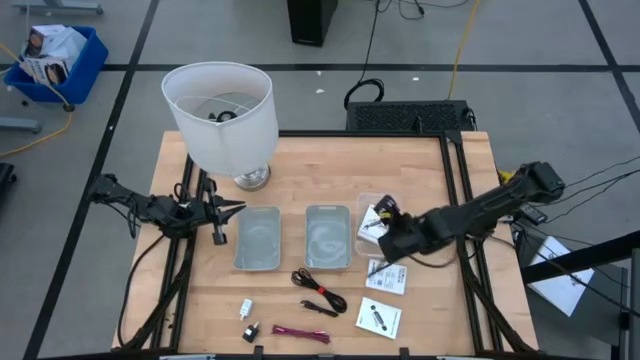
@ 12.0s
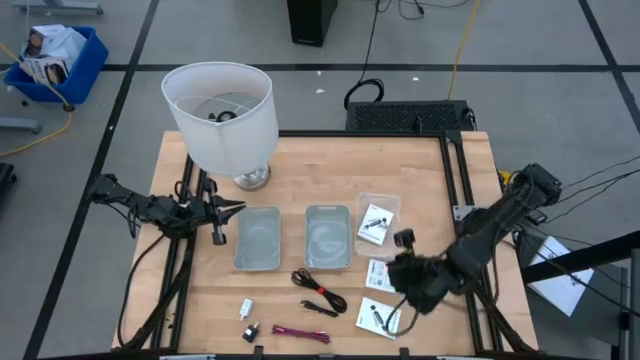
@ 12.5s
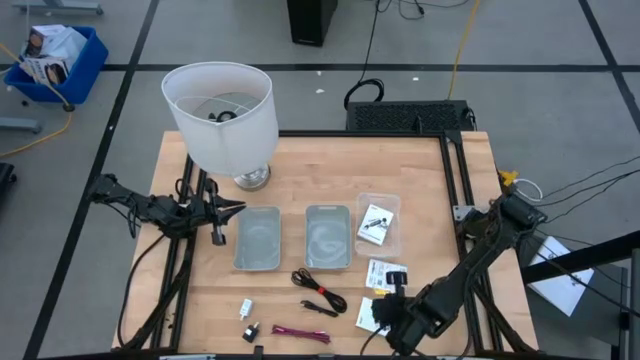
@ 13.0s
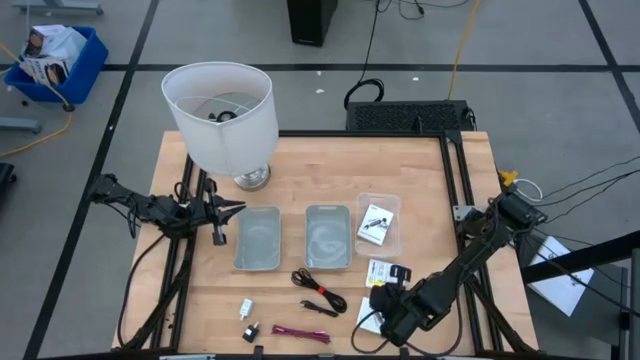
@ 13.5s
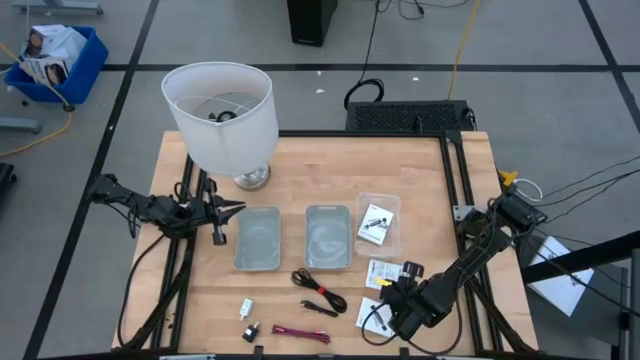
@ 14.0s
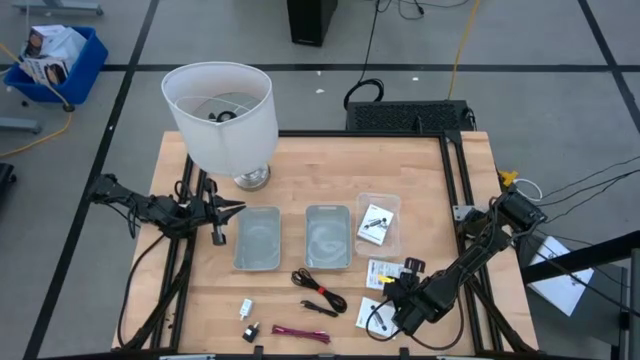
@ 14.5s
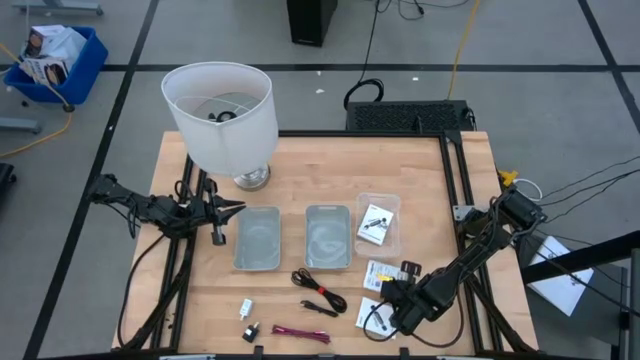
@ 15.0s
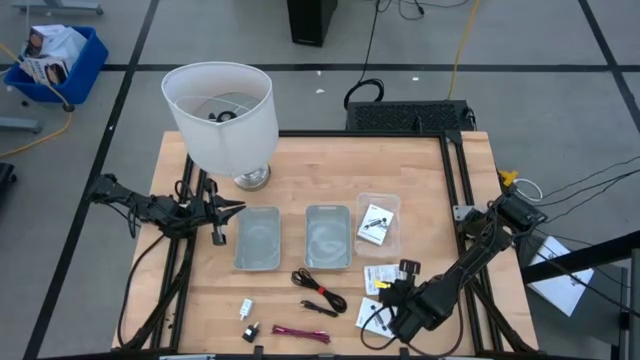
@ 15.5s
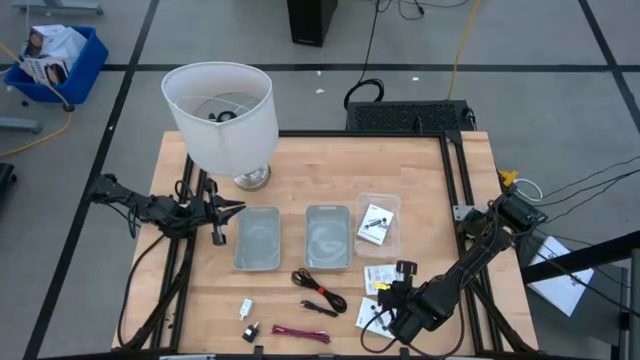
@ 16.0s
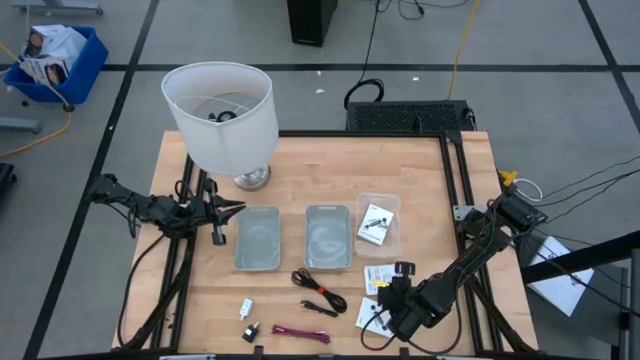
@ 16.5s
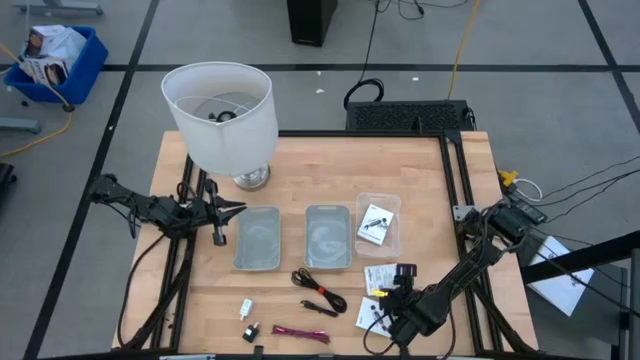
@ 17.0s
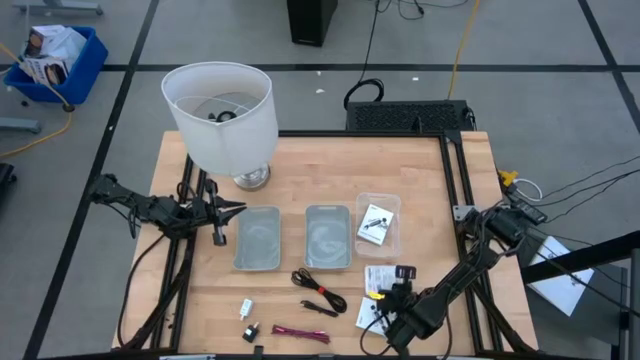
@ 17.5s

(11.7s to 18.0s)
Task: Pick and place items into bin
Put the top white card reader box into the transparent bin

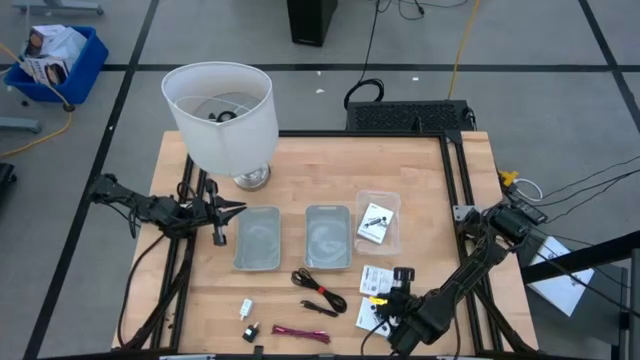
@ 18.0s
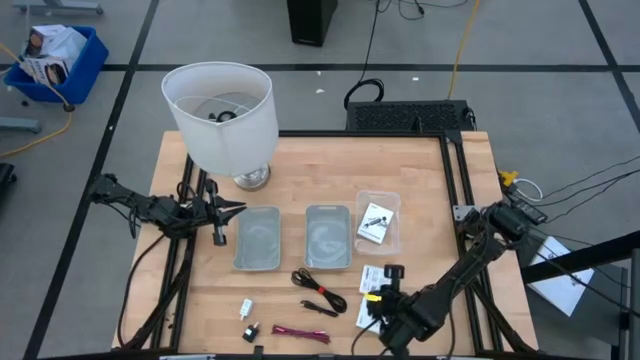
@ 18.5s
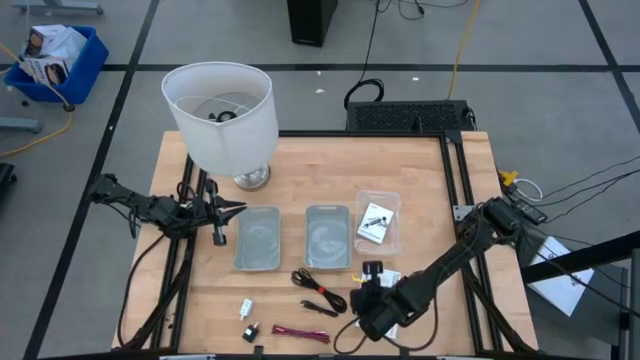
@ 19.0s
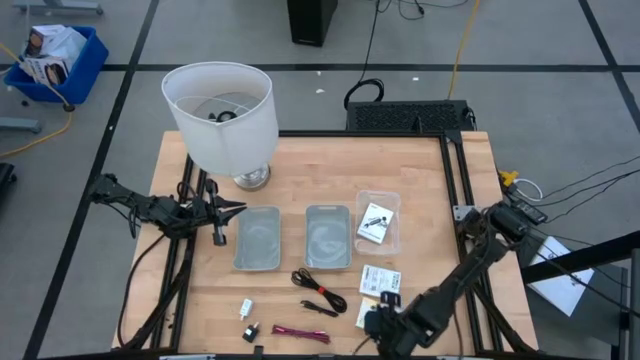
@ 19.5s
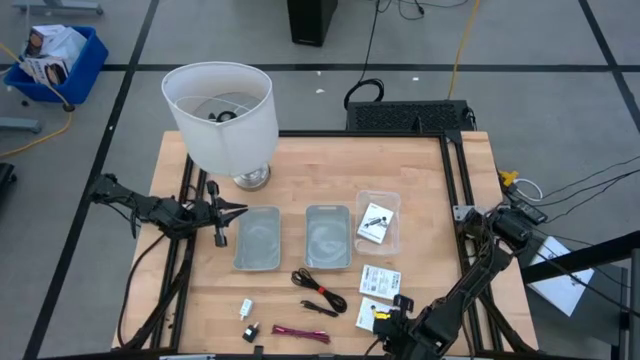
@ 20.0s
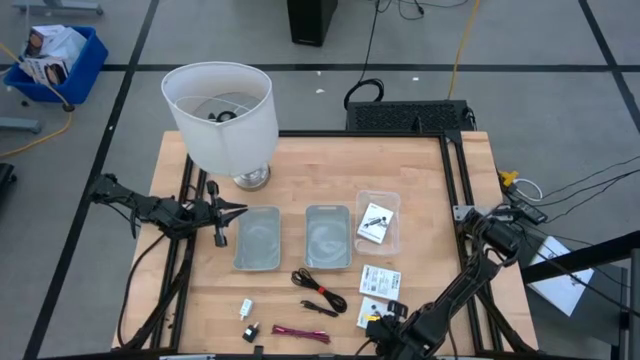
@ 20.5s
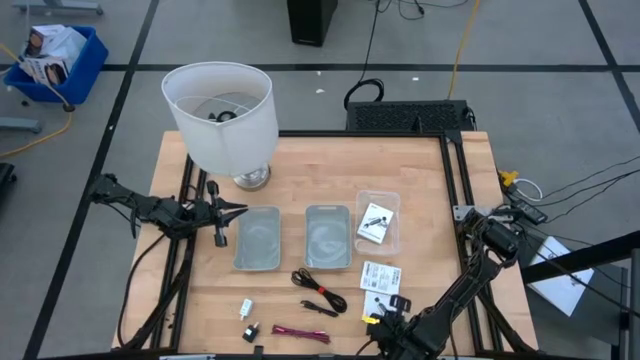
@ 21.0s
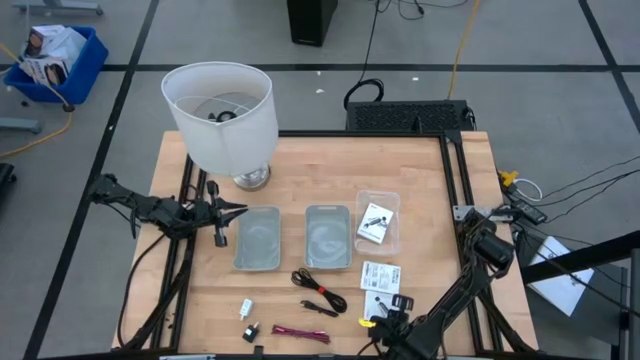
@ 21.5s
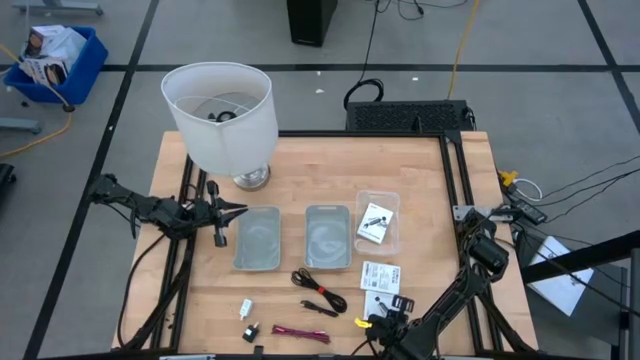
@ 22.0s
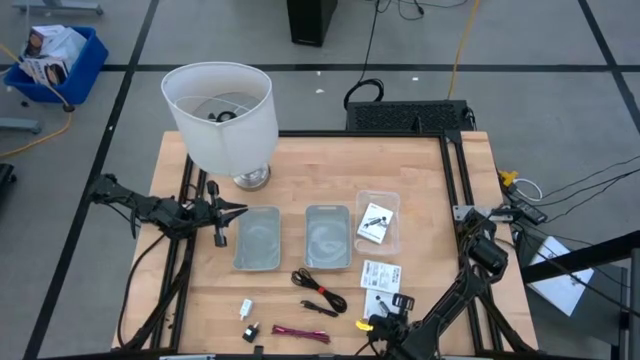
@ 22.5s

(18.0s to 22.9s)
Put the bottom white card reader box into the transparent bin

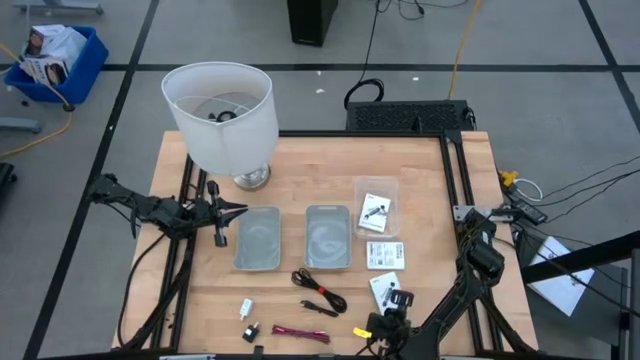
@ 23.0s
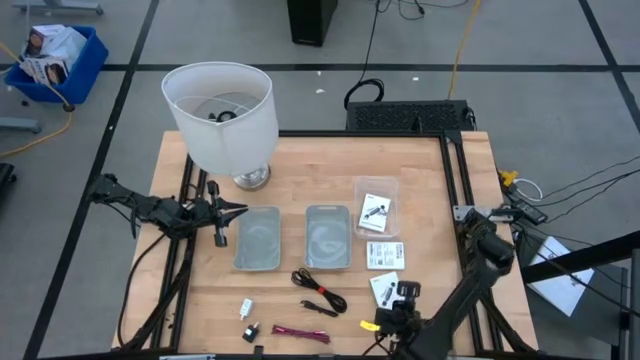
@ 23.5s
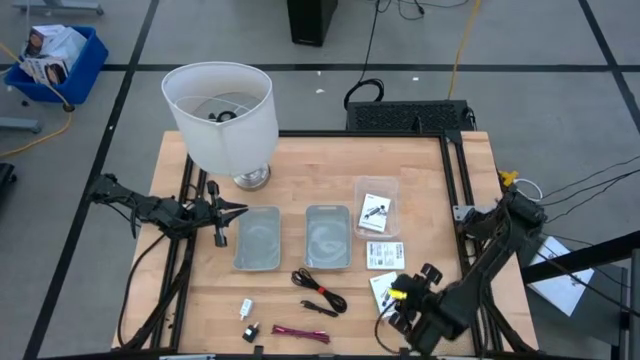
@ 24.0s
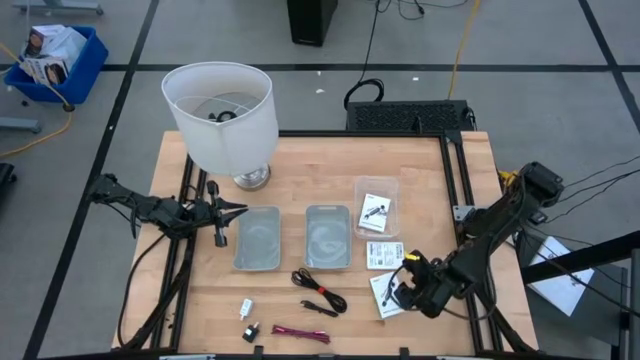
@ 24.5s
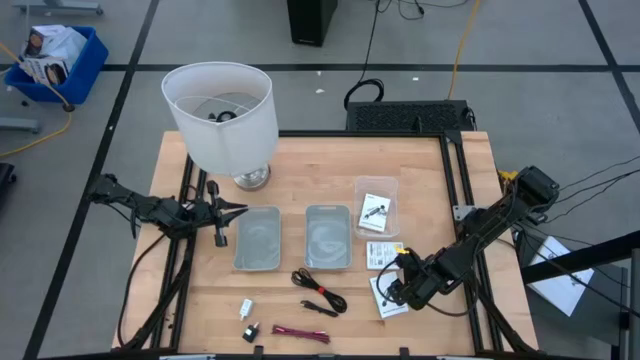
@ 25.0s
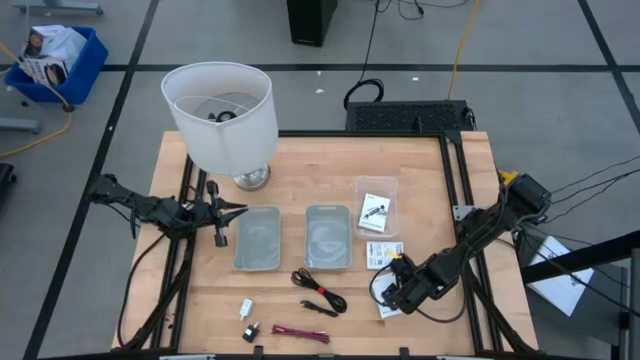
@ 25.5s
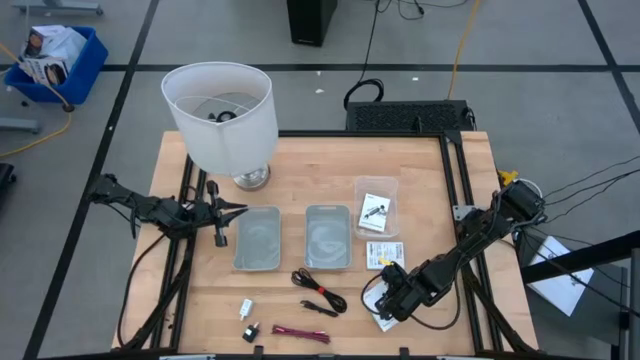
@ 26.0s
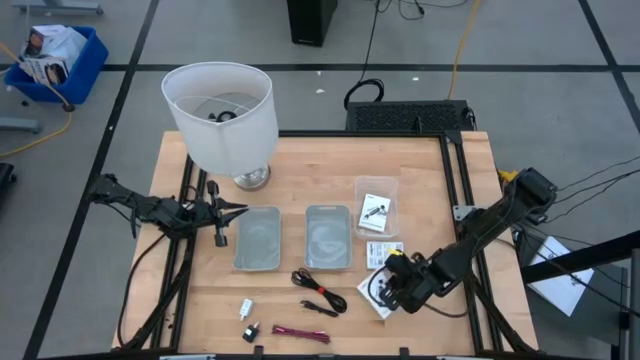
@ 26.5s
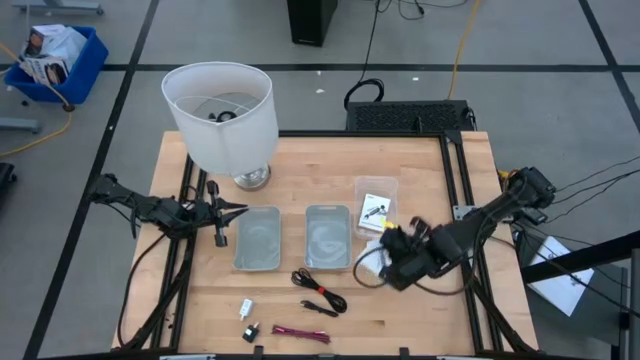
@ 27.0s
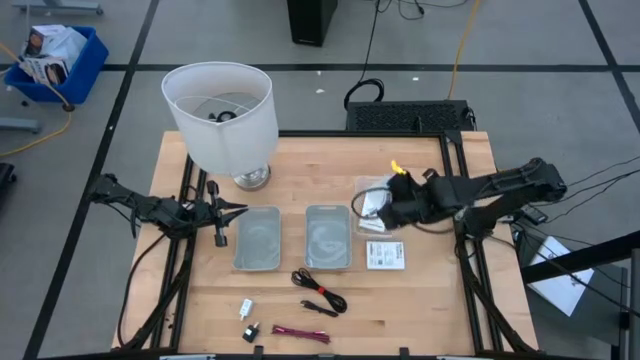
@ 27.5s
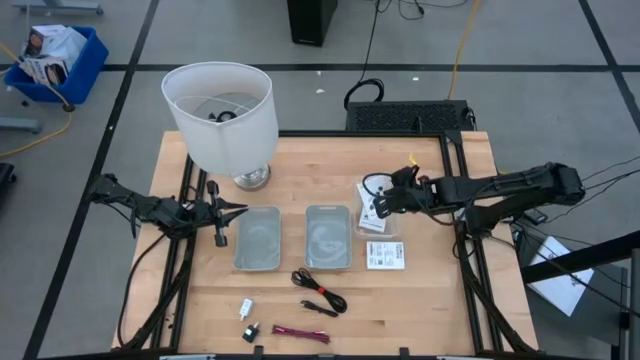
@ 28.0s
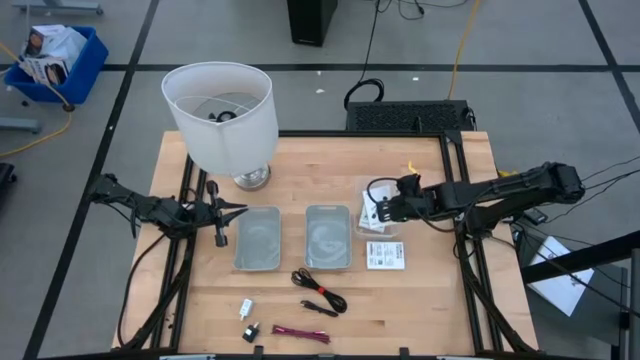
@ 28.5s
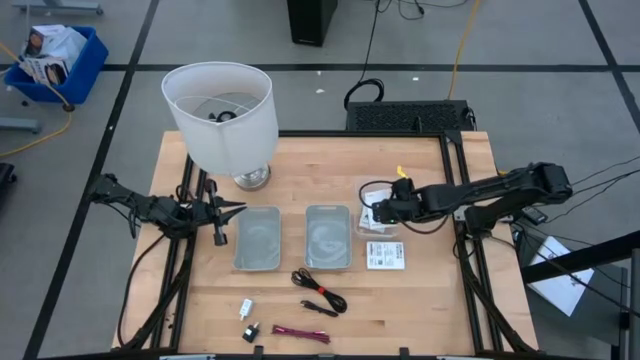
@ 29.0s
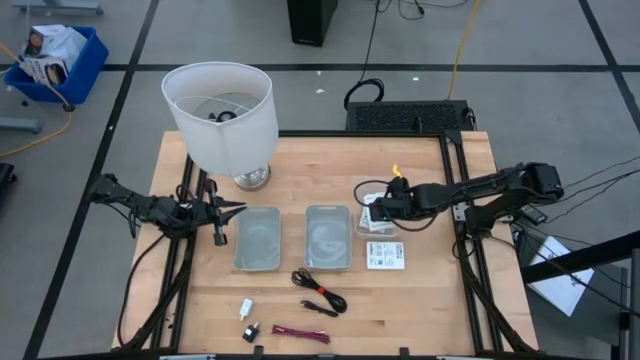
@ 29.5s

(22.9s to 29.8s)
Put the bottom white card reader box into the transparent bin

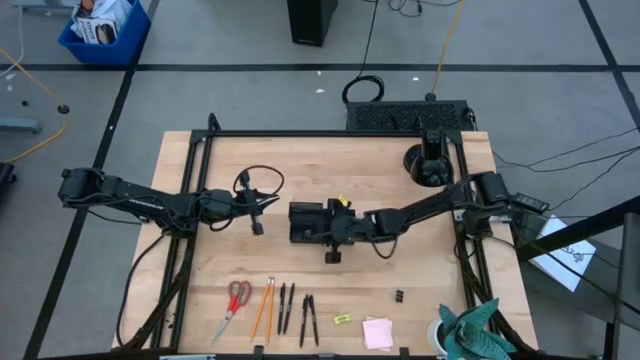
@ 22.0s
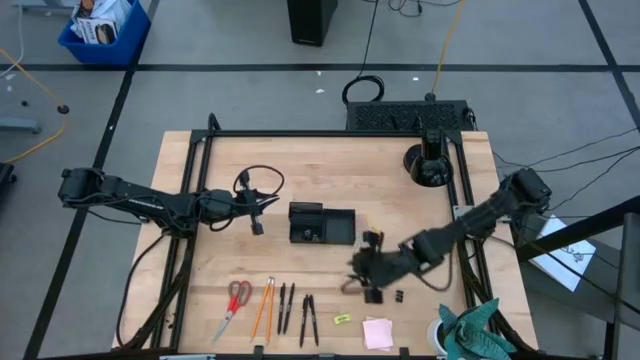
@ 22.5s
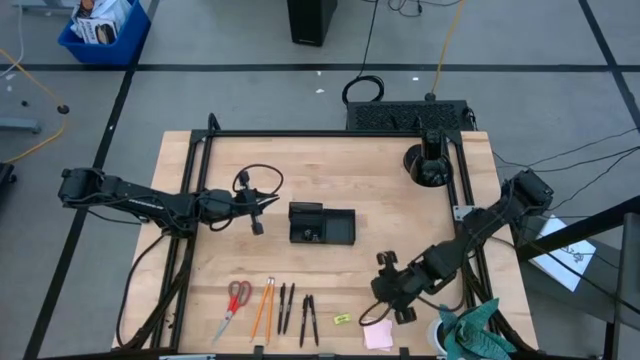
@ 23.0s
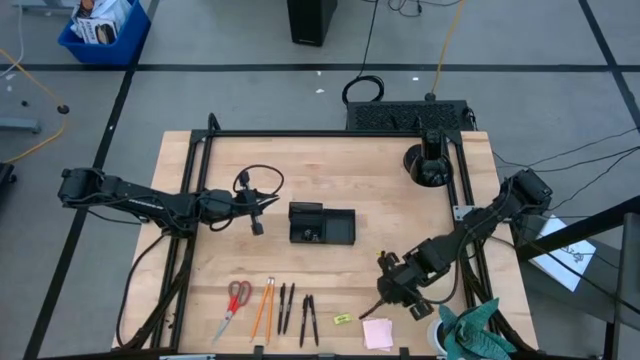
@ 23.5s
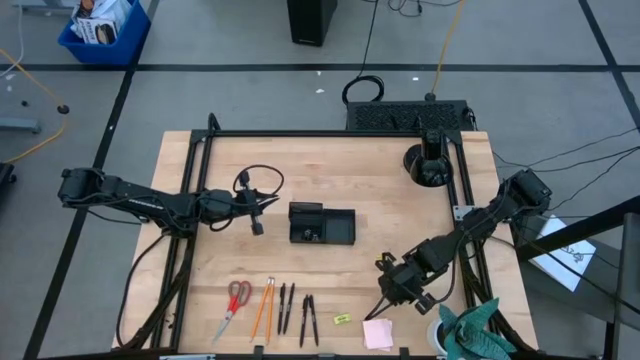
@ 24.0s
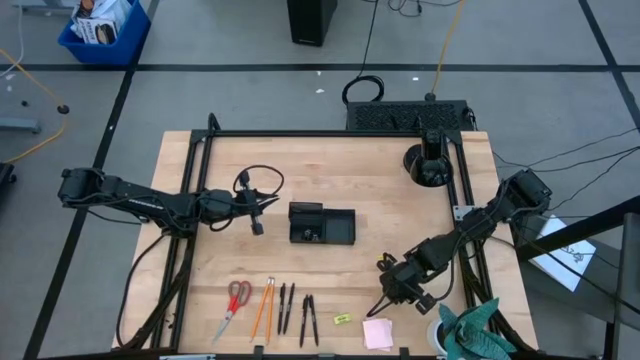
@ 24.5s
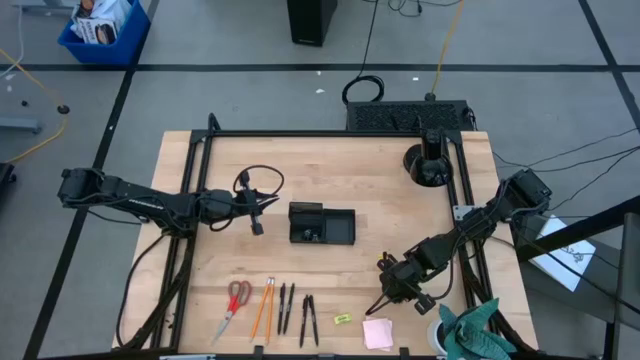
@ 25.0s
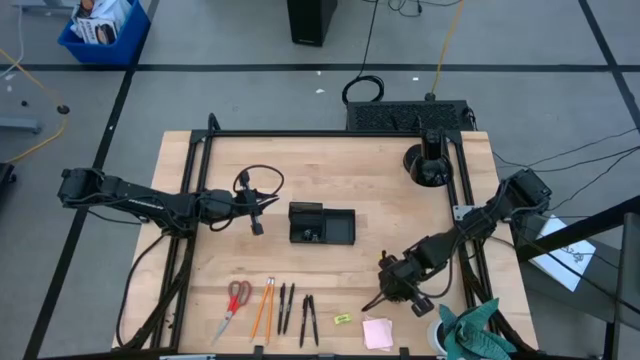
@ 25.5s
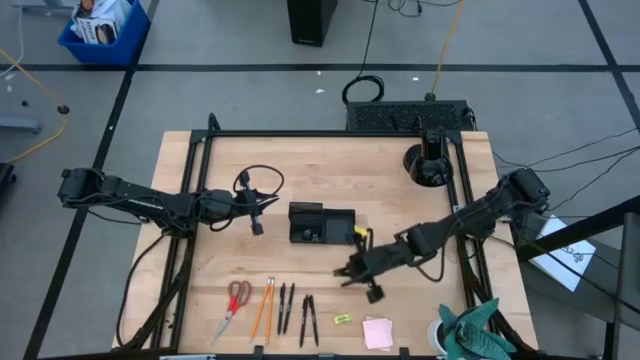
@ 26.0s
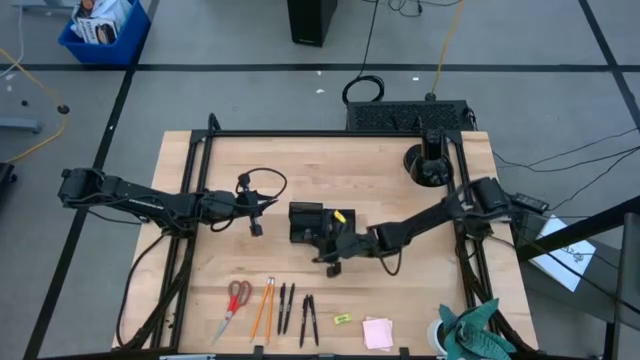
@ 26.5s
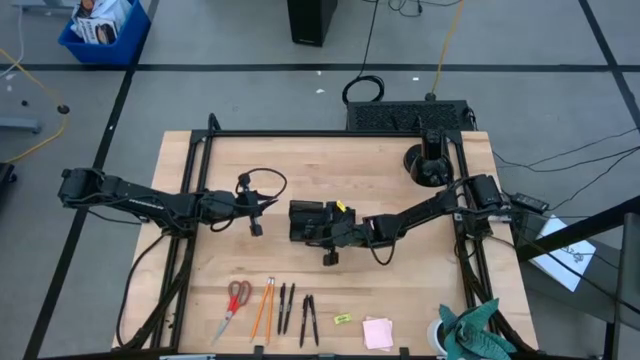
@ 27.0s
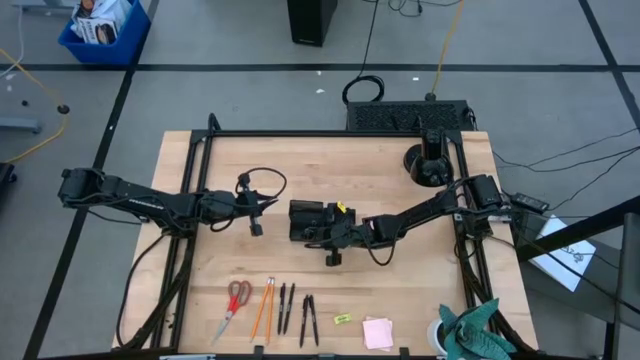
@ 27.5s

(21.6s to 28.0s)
Task: Pick and place office supplies into organizer
Put the black binder clip into the black desk organizer
